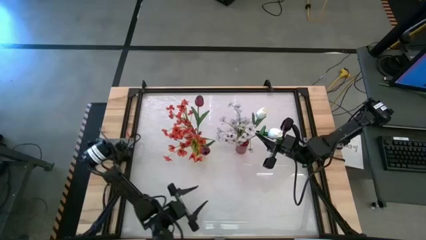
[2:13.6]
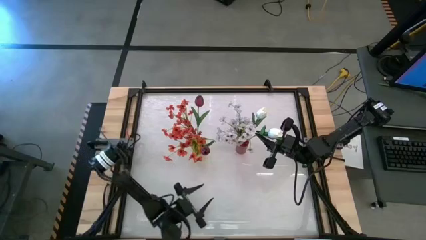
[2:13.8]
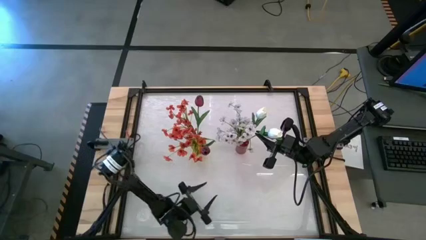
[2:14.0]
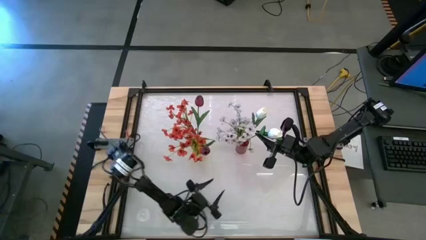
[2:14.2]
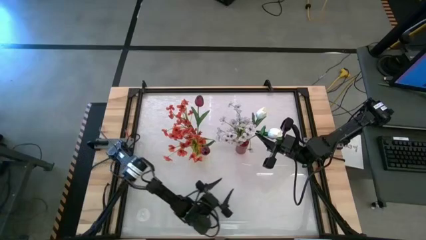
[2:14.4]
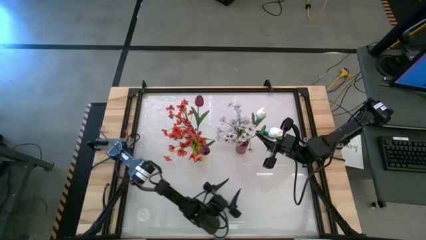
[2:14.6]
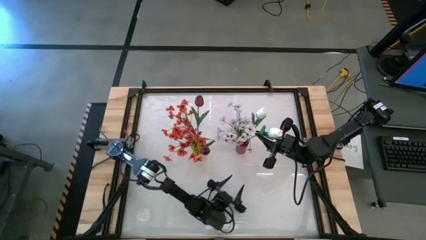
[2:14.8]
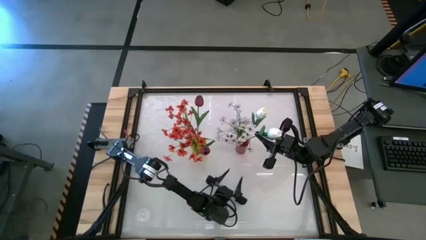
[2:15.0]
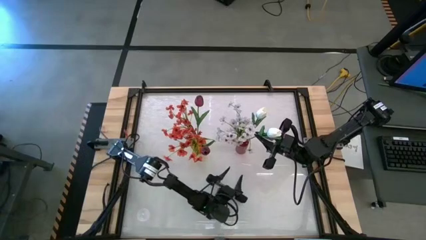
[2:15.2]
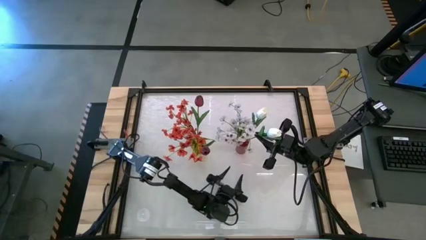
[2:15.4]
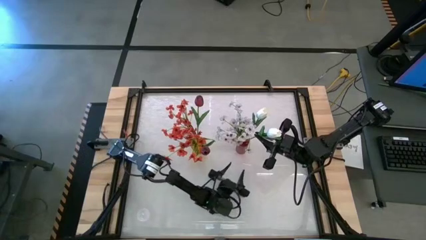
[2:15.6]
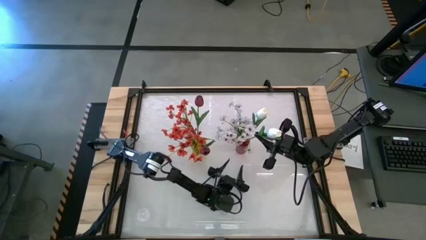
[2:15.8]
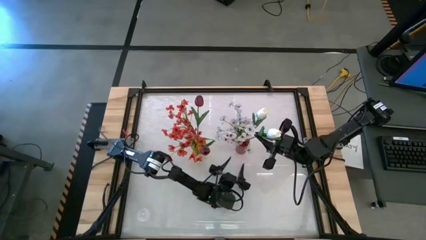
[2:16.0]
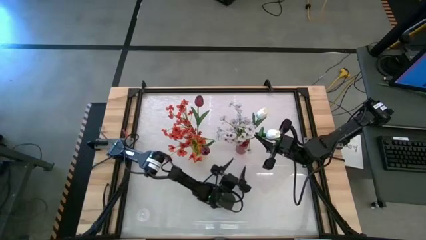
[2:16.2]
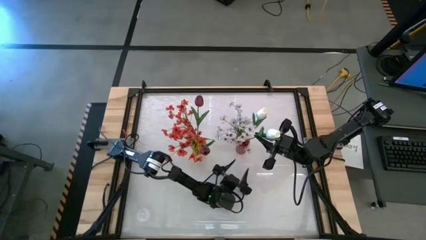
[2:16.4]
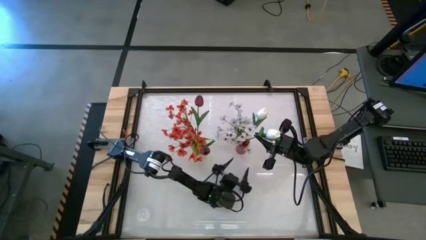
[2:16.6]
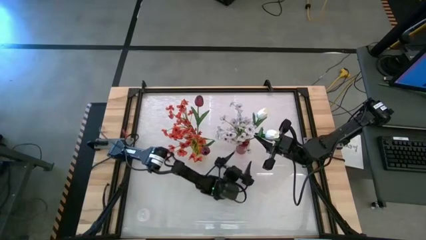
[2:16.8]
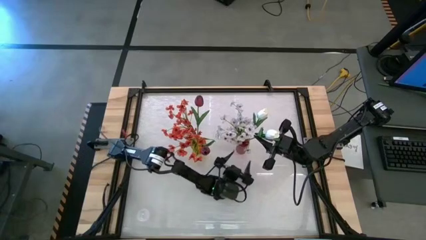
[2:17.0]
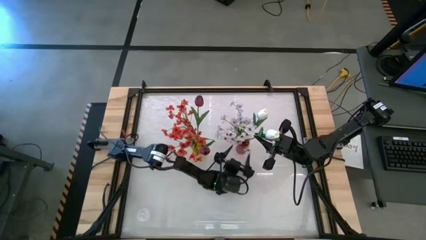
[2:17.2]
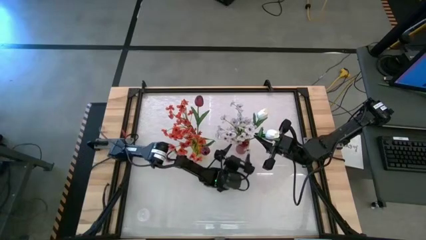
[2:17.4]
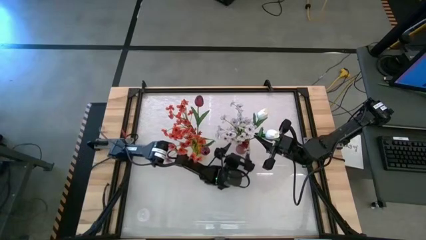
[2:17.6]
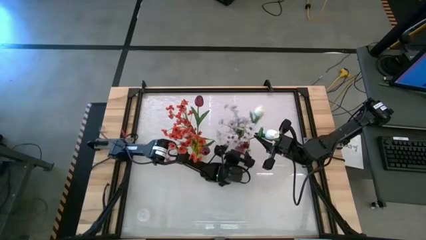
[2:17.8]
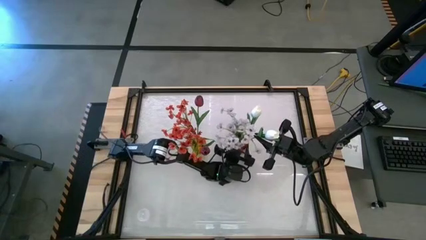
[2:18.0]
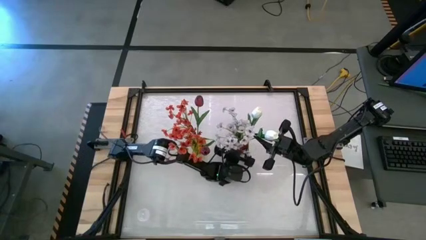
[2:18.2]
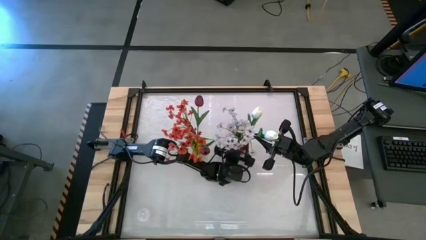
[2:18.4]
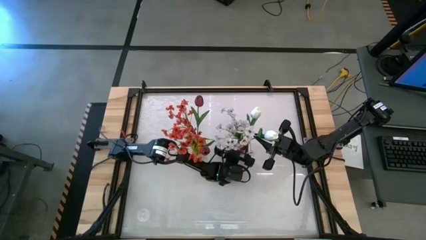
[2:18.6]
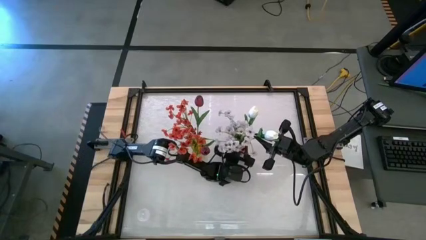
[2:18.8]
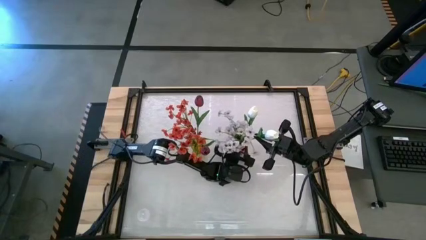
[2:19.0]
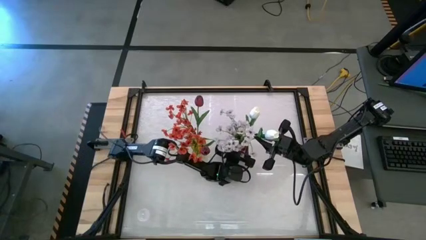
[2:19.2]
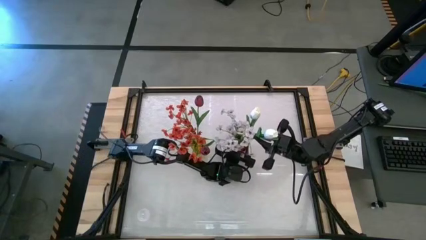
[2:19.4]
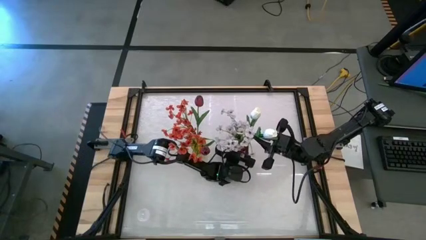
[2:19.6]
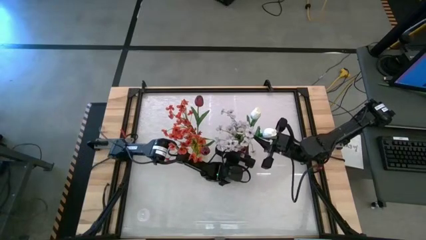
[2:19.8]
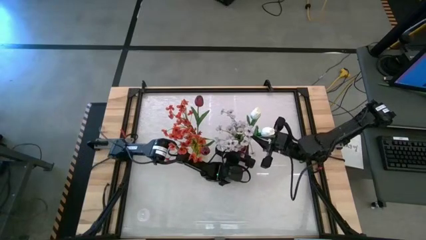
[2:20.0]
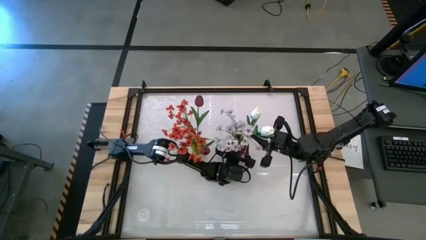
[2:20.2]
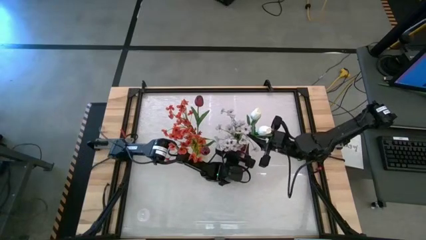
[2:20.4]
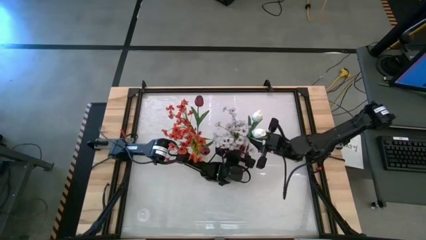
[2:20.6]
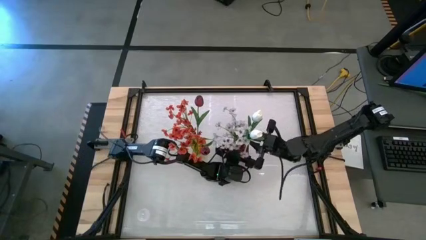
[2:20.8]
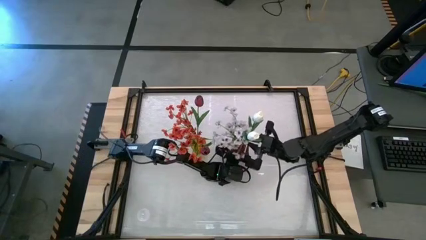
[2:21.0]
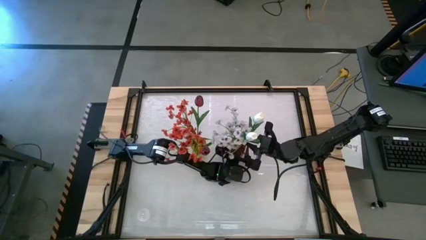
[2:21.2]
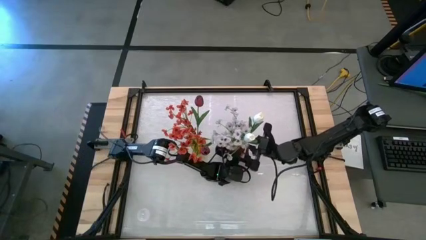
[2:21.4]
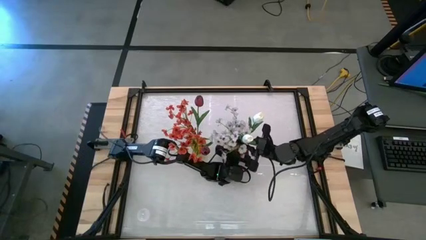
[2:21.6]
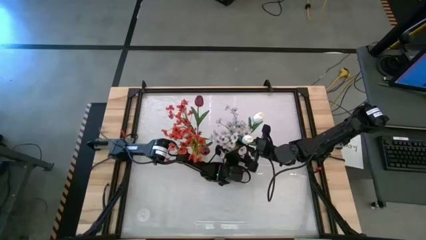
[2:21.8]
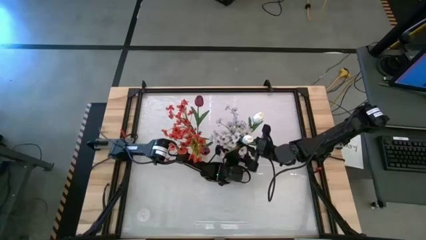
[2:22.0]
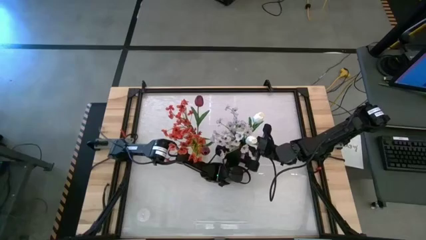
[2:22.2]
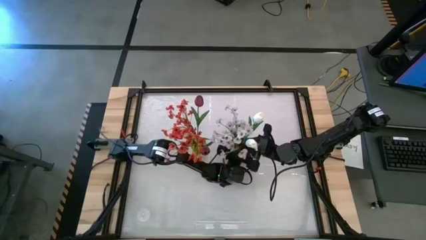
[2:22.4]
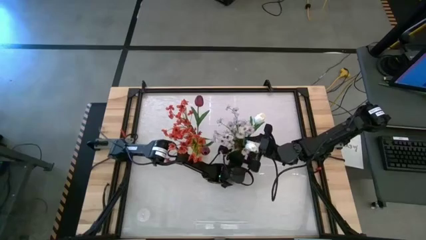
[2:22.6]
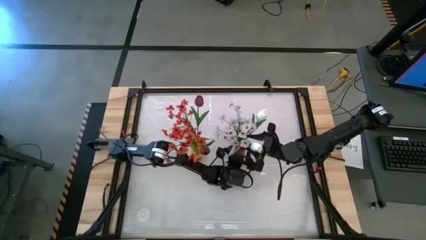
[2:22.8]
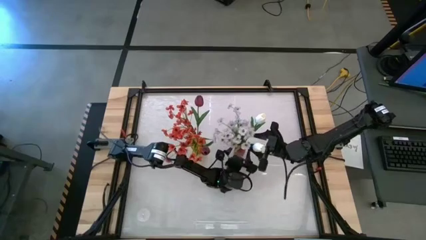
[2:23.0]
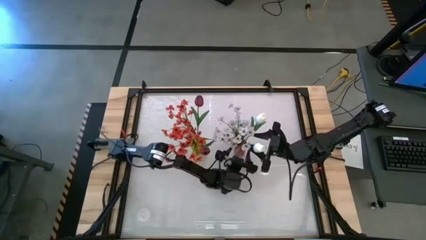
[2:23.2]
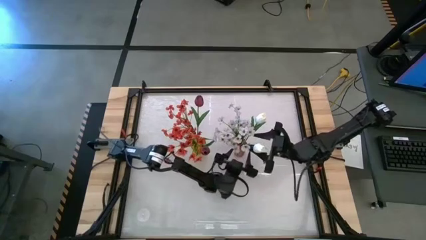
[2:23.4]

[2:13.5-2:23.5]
Task: Sort flowers into vase by color
Put the white tulip into the red flower vase

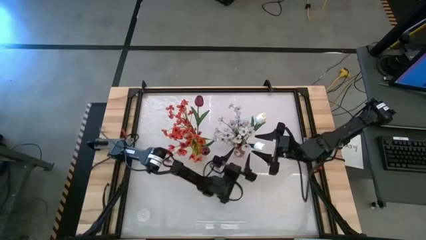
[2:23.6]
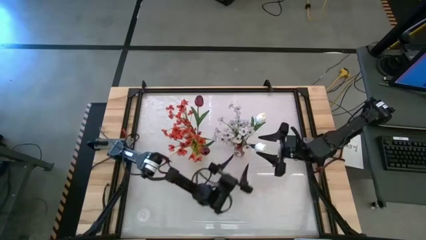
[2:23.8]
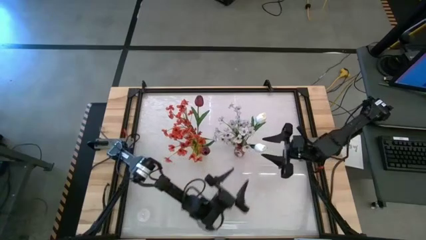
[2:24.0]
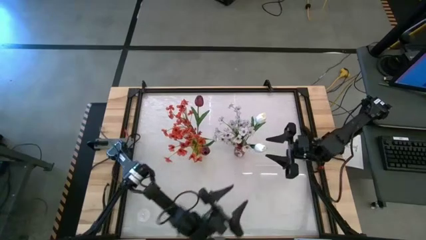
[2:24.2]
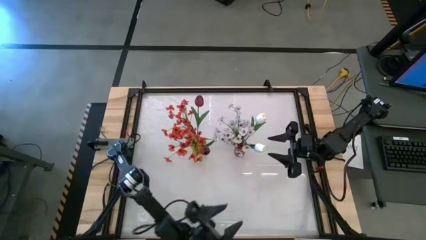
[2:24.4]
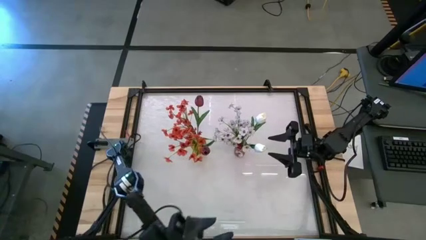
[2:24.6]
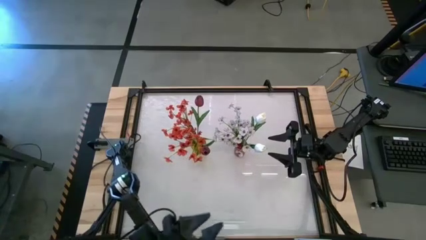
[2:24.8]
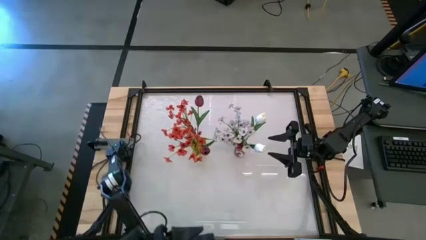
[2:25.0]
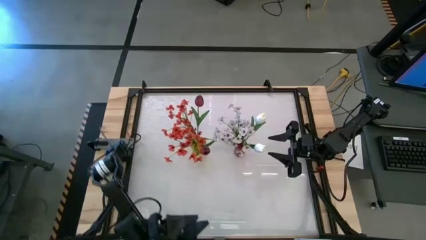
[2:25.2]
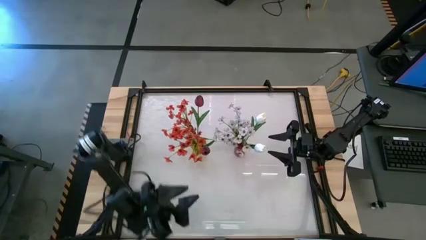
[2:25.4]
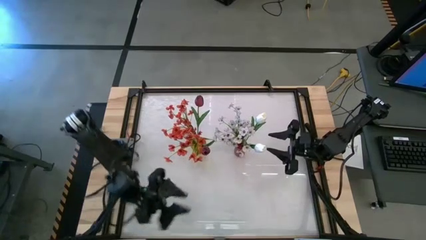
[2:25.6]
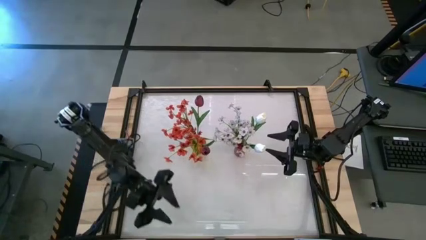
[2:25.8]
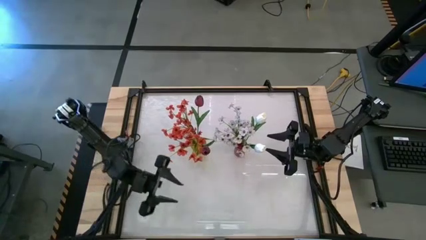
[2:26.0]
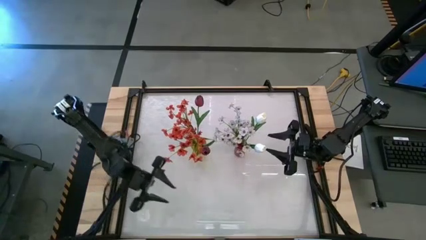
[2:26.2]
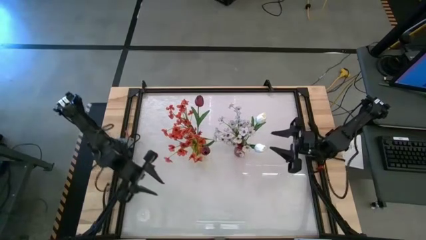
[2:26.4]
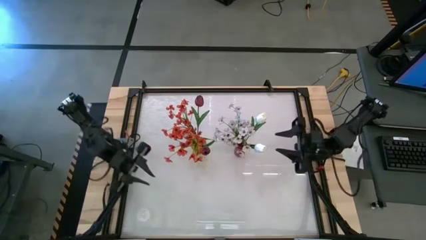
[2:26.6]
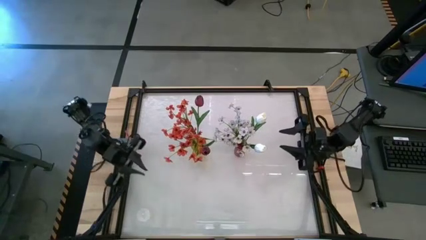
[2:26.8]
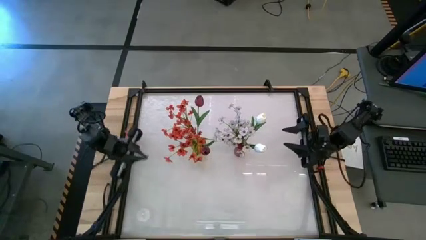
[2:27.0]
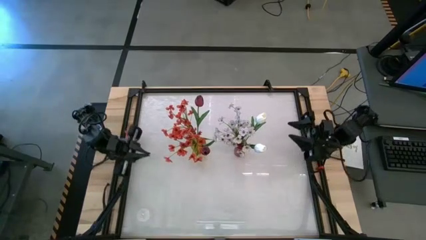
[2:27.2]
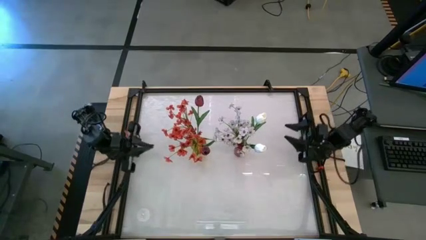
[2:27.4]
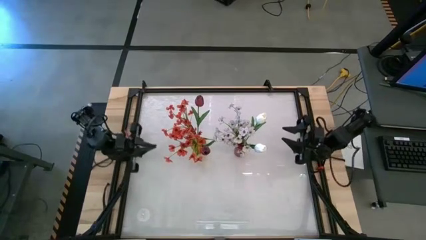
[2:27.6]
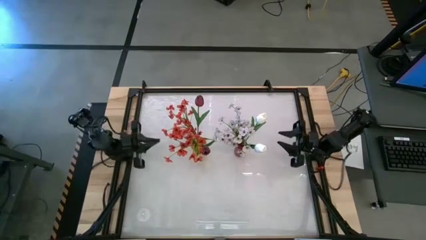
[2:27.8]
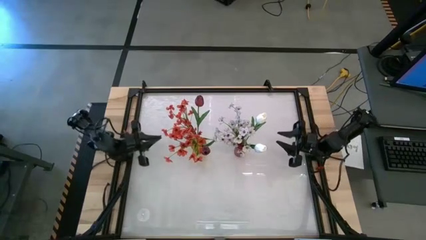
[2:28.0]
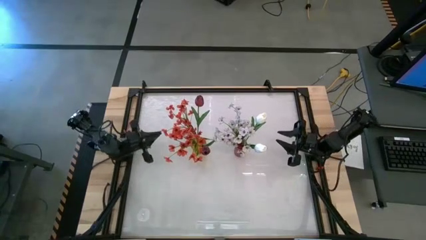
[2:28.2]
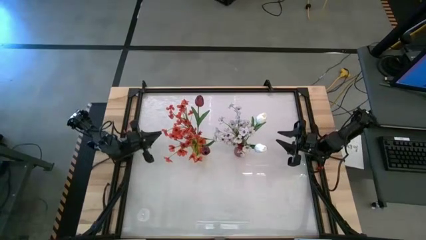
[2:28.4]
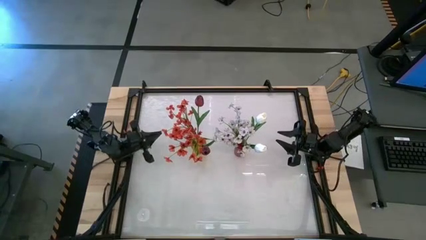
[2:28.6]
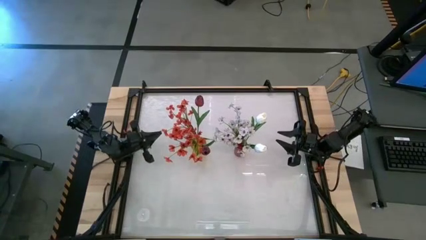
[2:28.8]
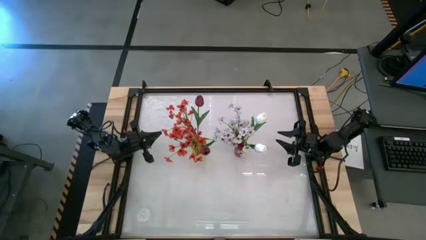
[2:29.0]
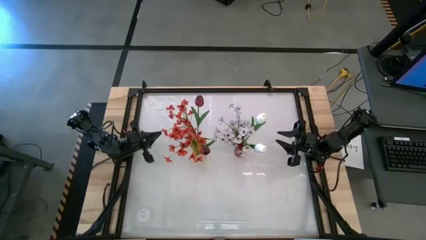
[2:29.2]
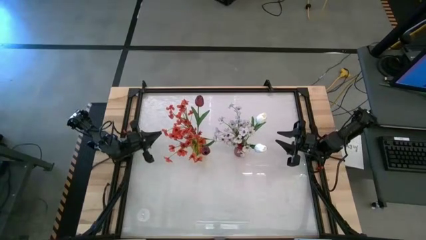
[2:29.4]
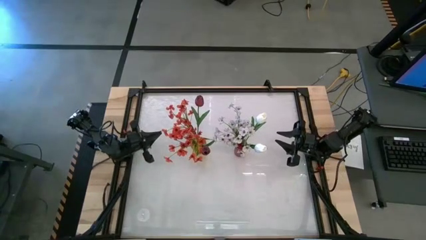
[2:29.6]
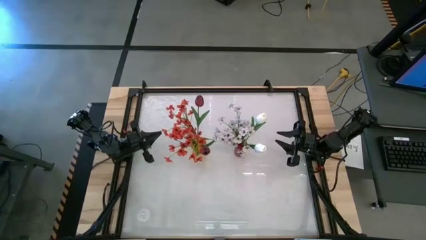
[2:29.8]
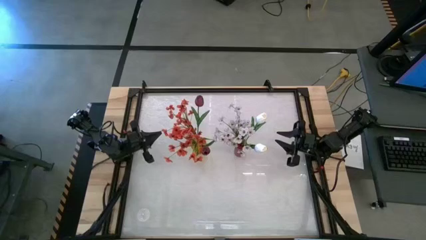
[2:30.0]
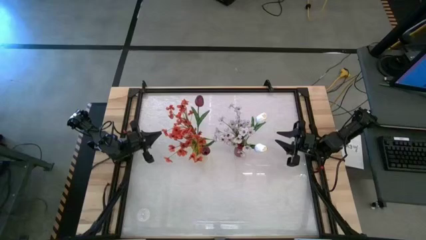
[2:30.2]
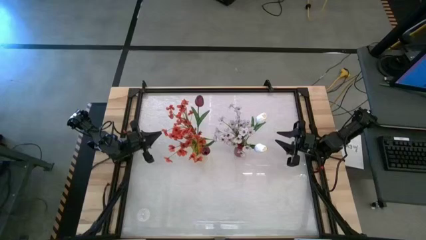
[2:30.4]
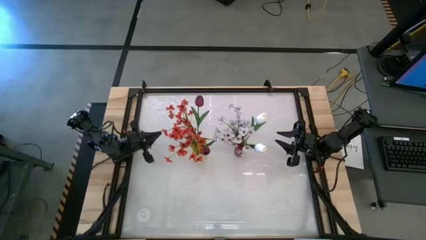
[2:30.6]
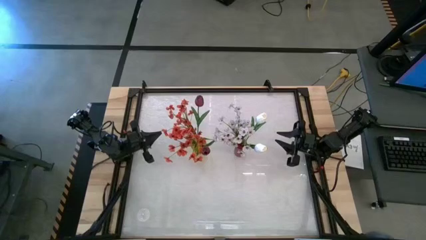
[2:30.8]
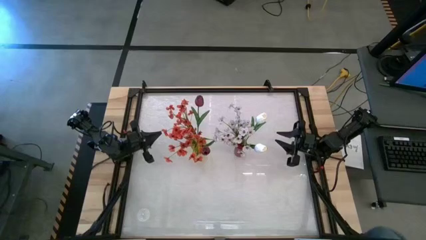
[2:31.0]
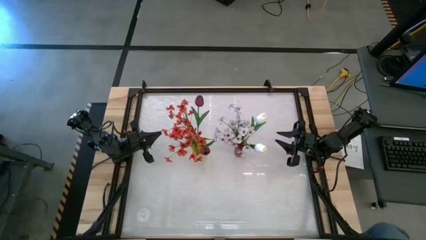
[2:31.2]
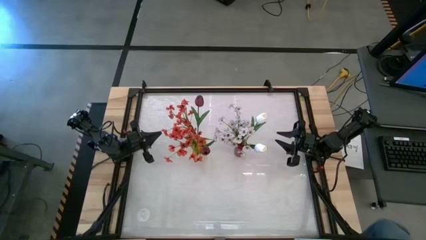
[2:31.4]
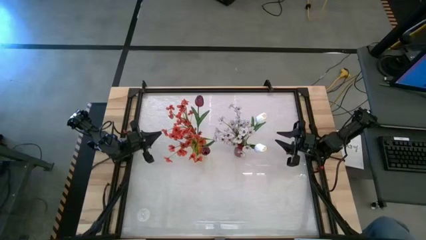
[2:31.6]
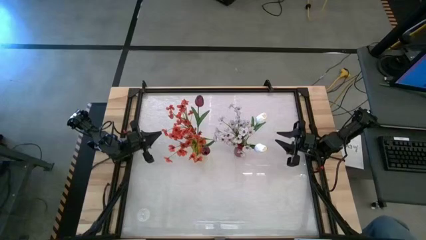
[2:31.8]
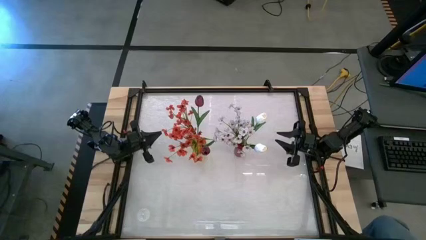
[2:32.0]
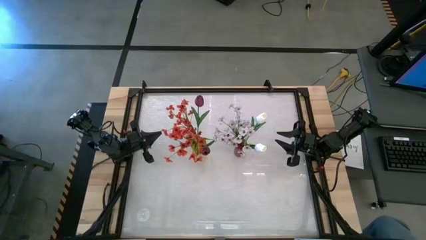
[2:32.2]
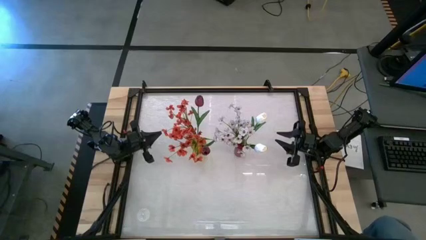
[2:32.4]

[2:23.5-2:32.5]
Return to Home Position
